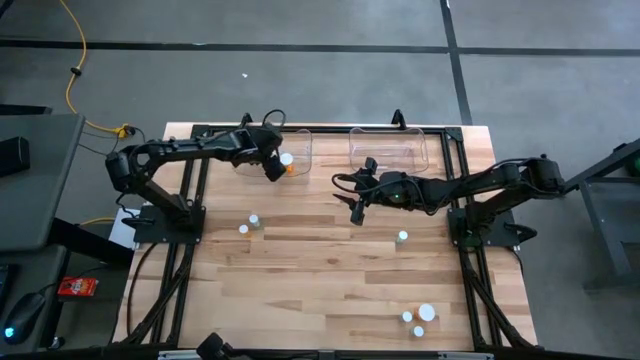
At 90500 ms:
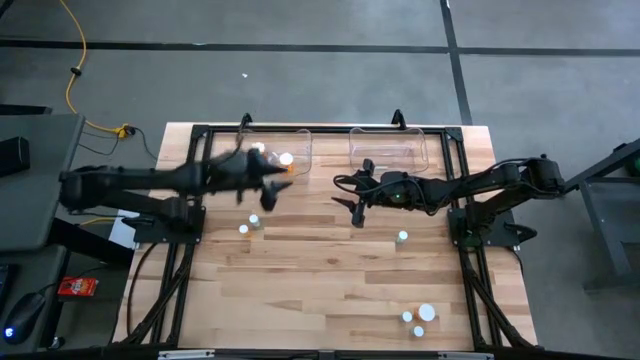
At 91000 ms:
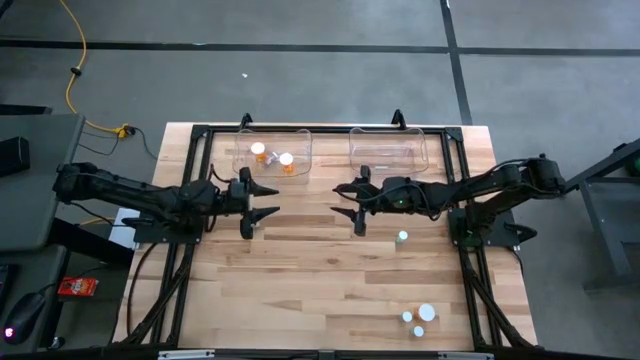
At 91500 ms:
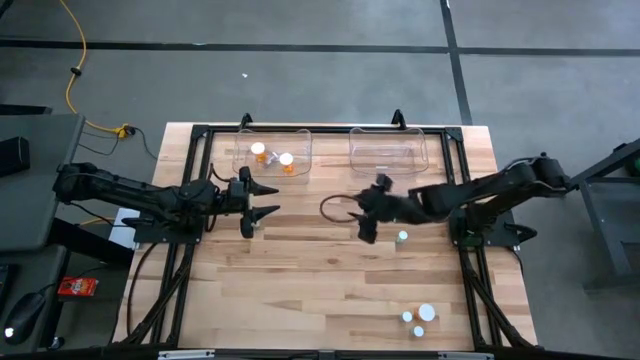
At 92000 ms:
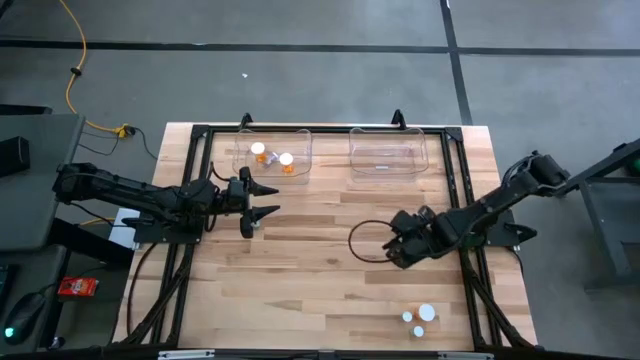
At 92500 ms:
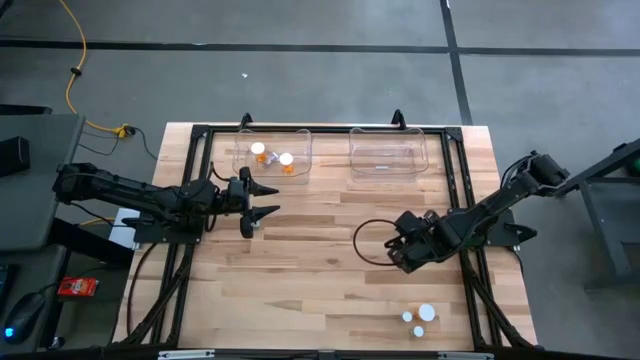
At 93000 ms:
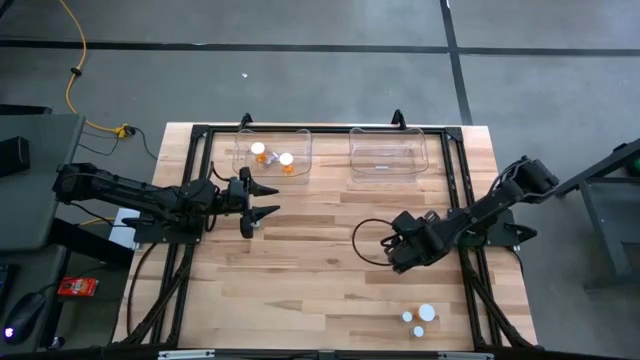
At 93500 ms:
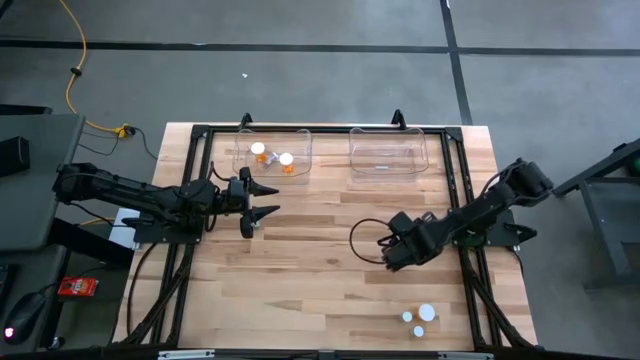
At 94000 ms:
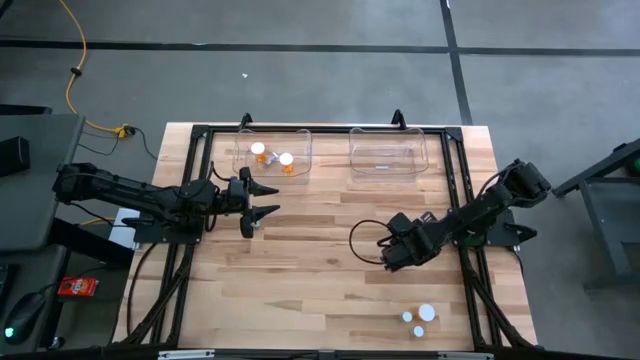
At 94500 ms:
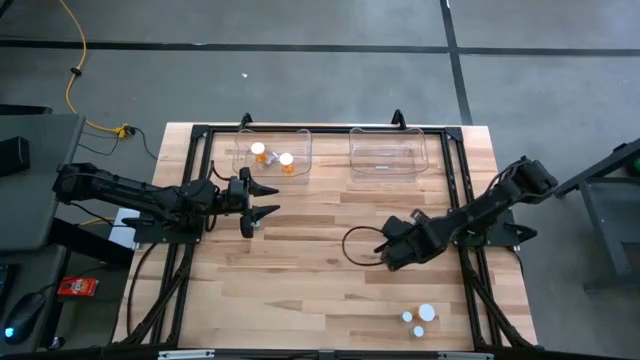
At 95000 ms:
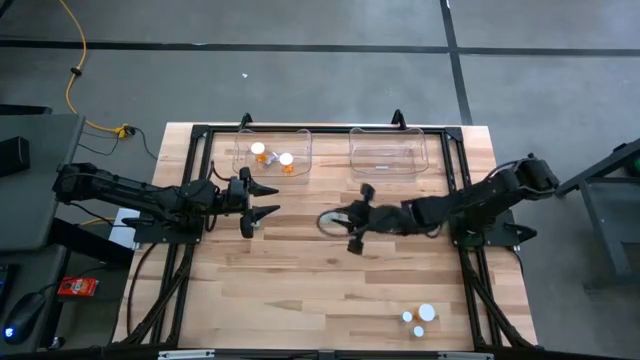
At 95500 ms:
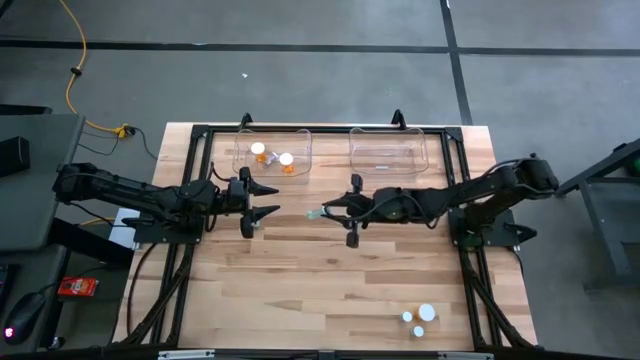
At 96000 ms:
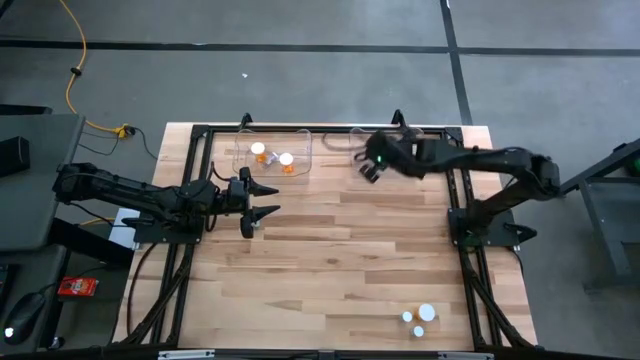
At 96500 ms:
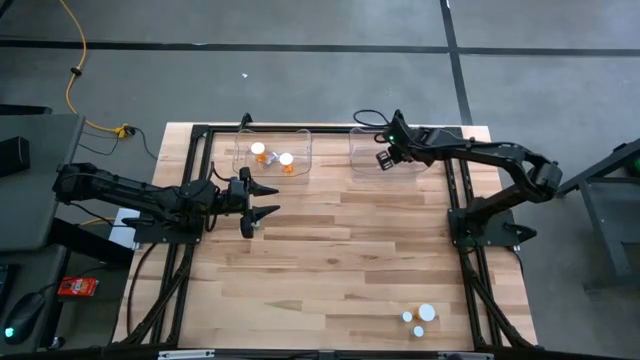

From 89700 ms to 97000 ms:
Task: Pick and place medicine bottles into bin by pill shape (circle, oval)
Put the top right blue tablet bottle into the right transparent bin

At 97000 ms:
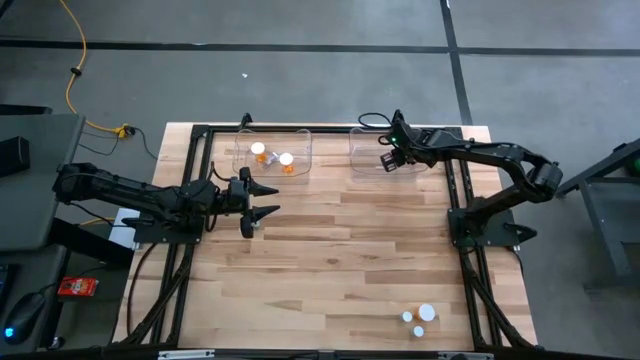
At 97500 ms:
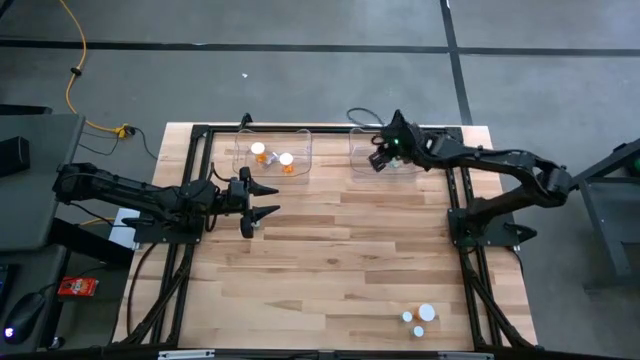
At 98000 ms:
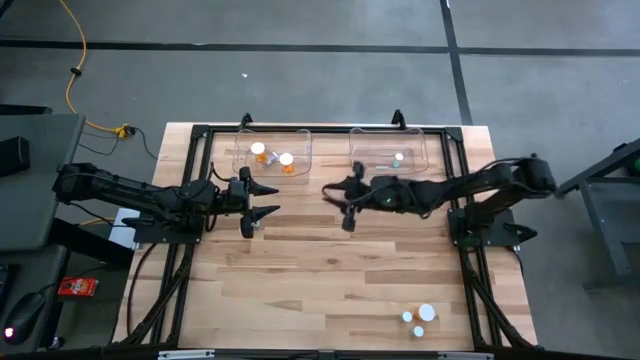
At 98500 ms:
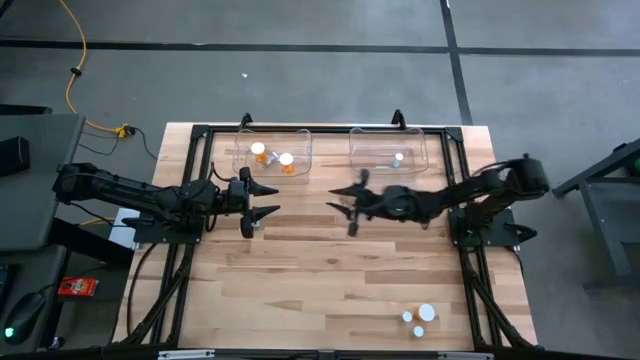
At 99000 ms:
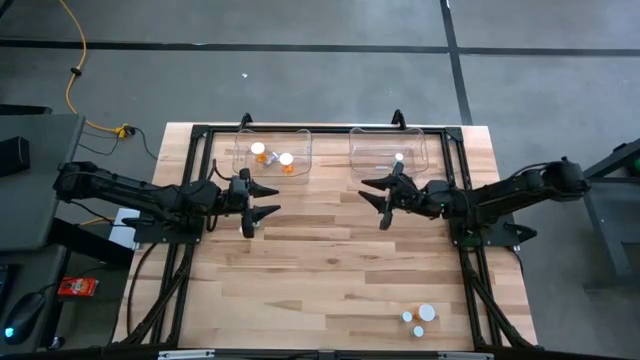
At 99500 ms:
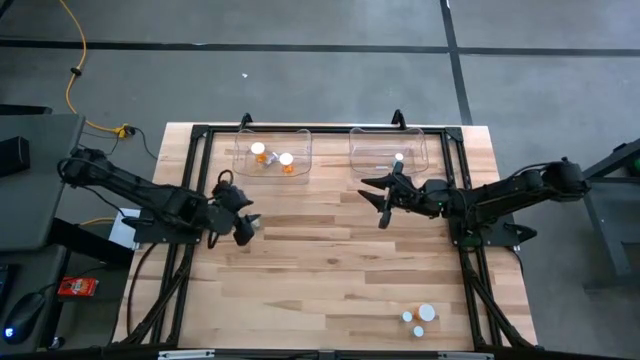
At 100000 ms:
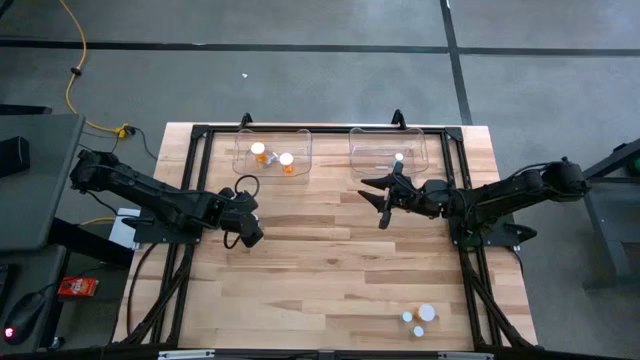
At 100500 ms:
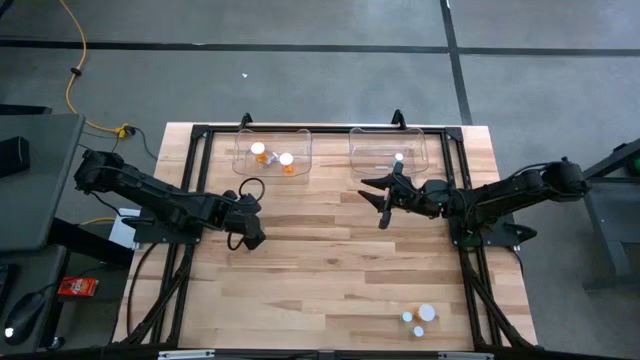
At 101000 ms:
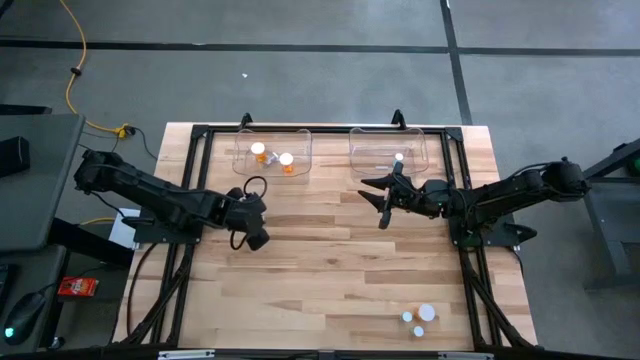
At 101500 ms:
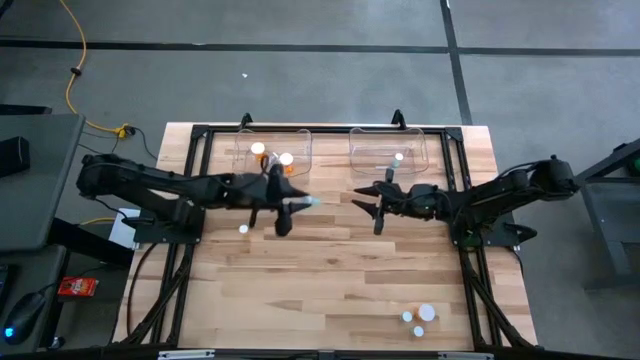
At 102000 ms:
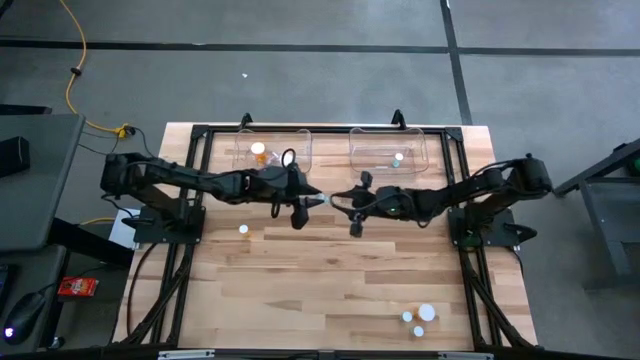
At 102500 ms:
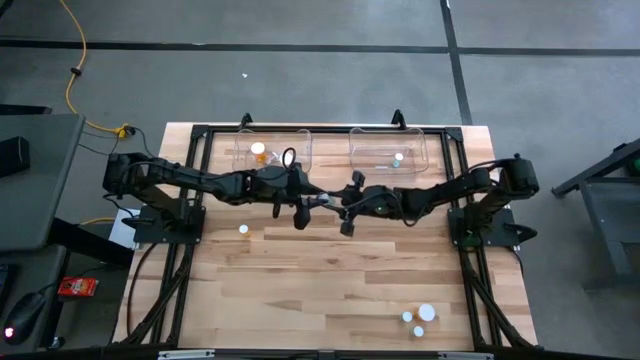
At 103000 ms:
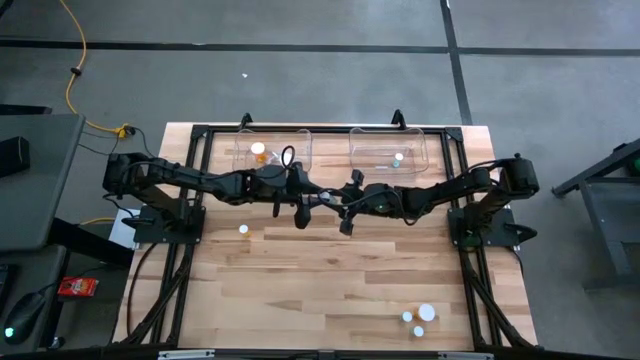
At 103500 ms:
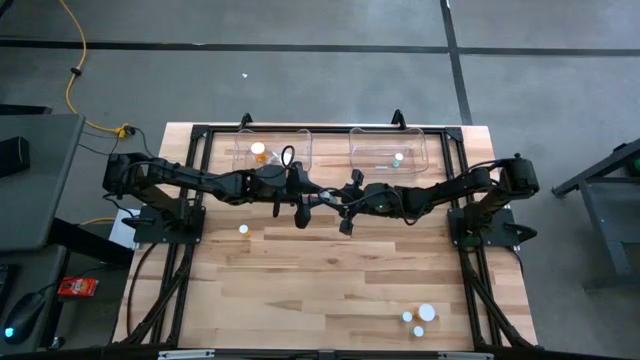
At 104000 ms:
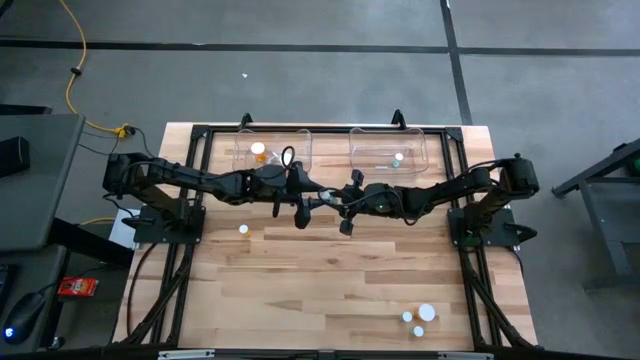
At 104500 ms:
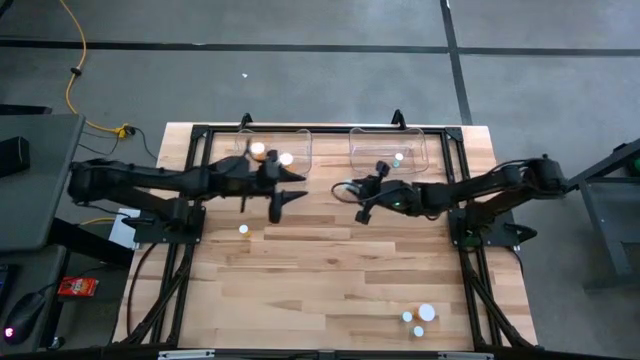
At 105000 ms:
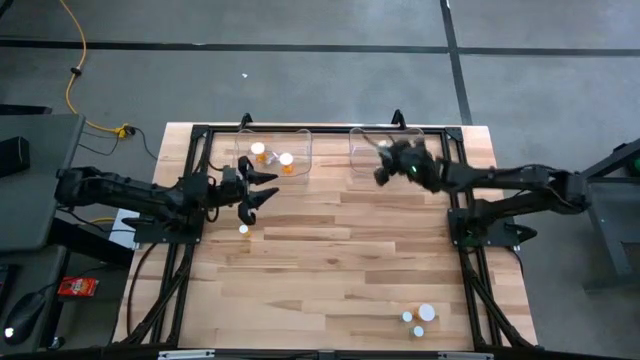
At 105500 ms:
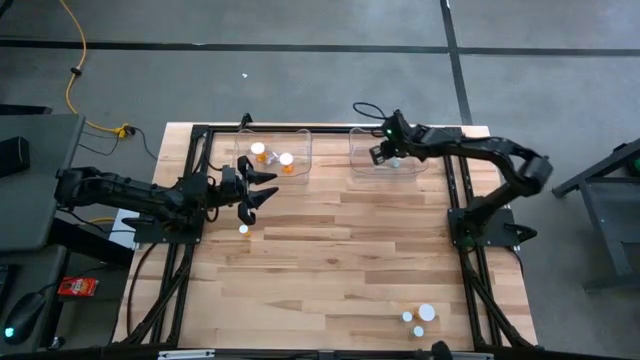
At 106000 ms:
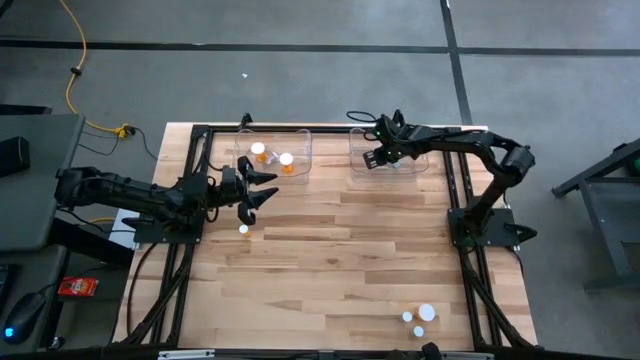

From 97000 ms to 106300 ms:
Put the top blue tablet bottle into the right transparent bin

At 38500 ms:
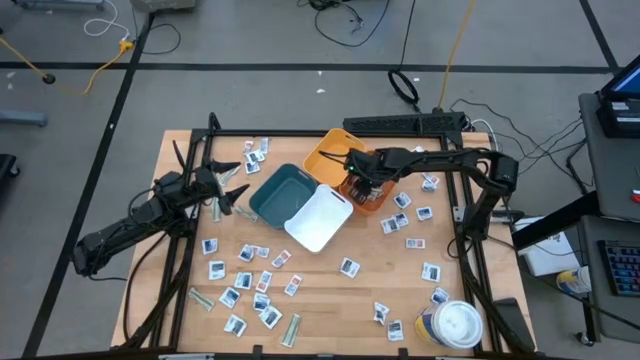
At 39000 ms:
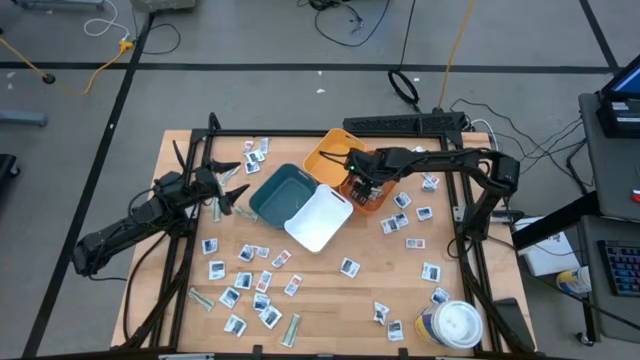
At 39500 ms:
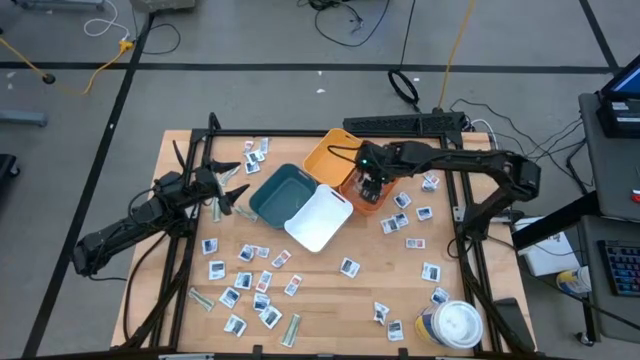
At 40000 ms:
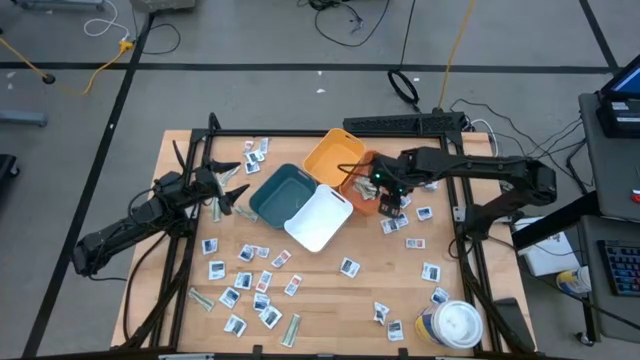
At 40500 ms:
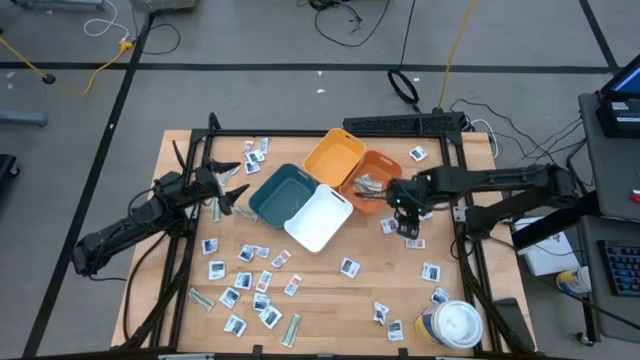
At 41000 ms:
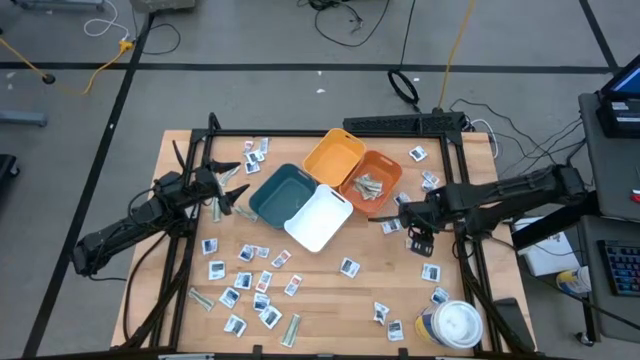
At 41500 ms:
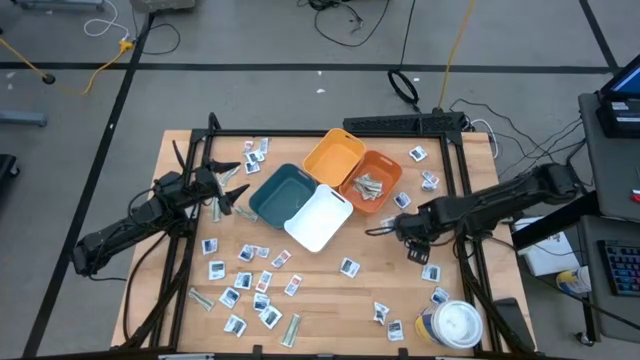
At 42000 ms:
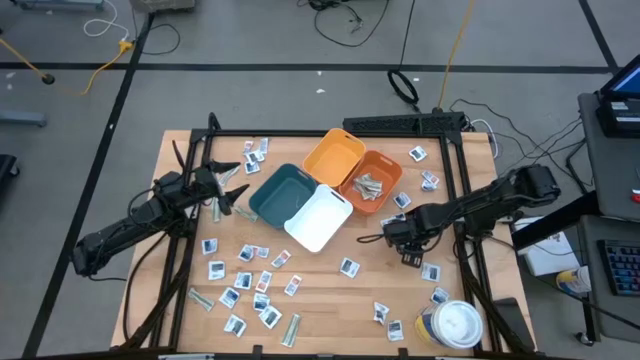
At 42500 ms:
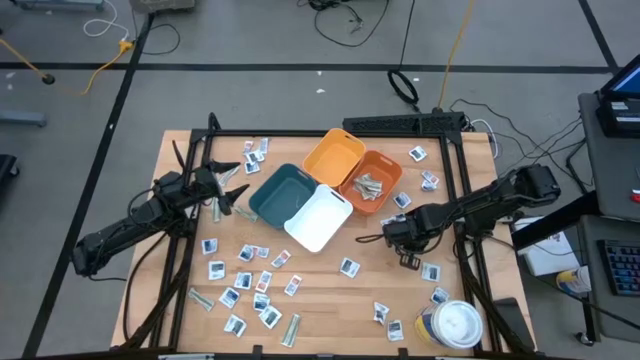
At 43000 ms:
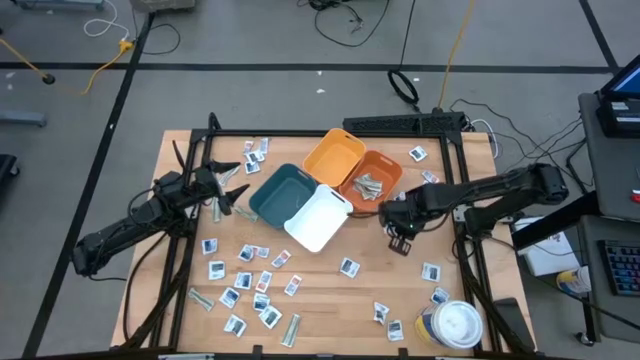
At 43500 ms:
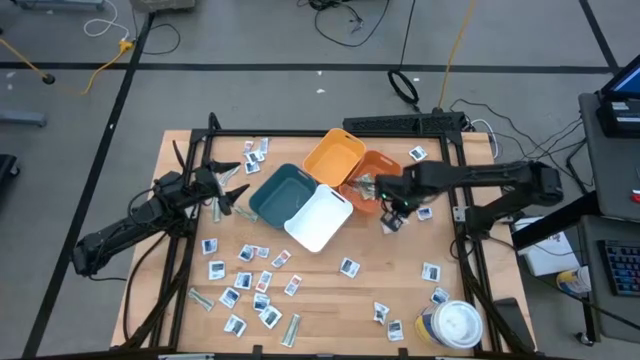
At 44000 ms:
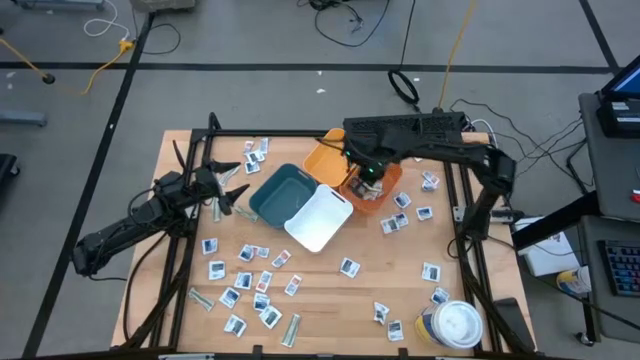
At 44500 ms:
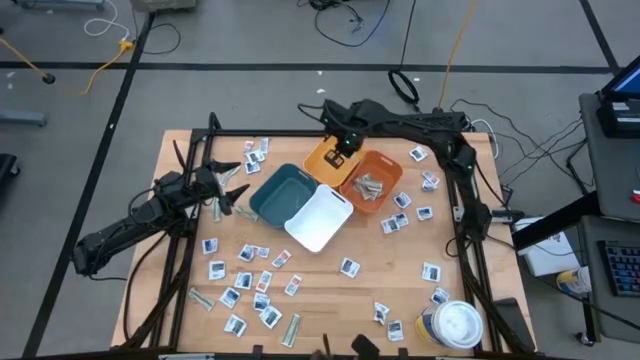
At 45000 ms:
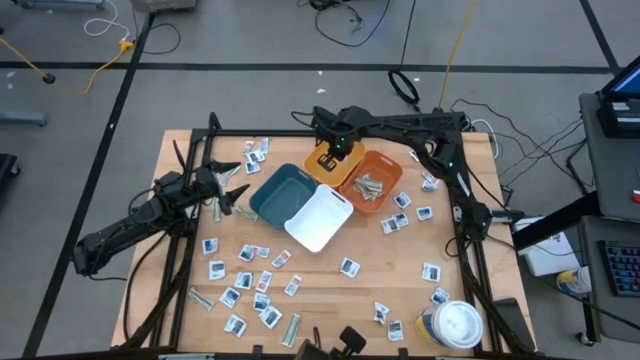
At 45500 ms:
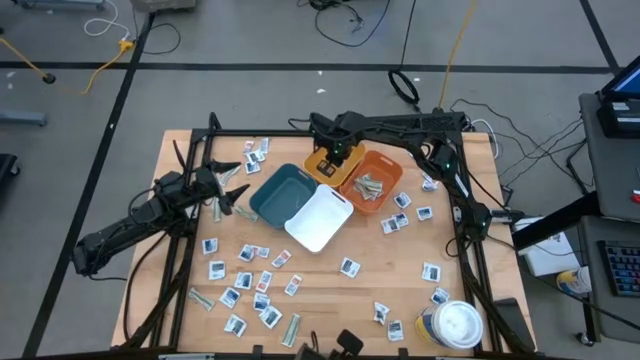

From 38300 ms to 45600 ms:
Task: Pick & Place First Aid Supplies
Put the orange ointment pack into the yellow bin
